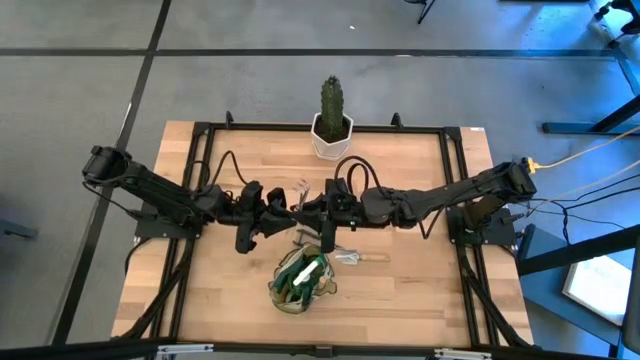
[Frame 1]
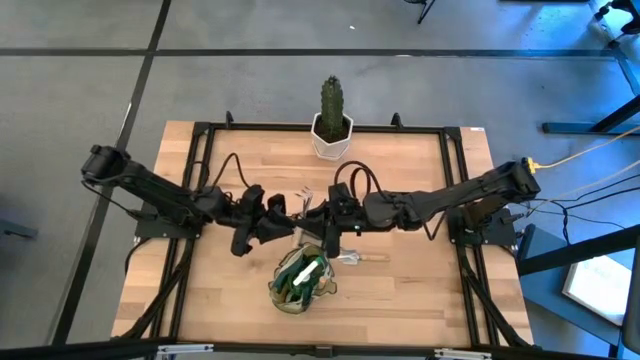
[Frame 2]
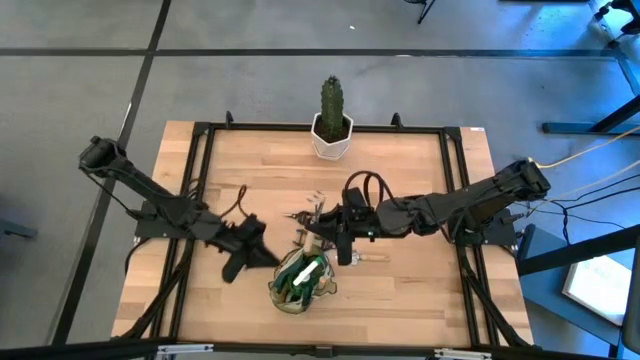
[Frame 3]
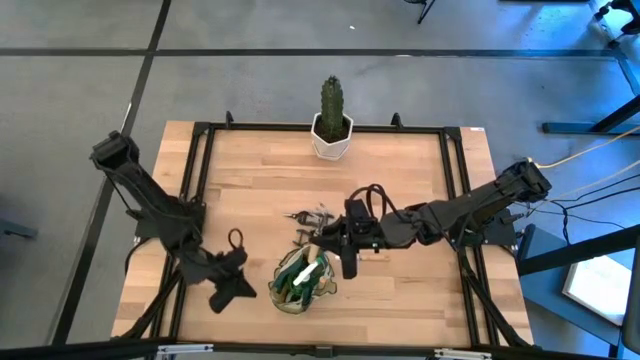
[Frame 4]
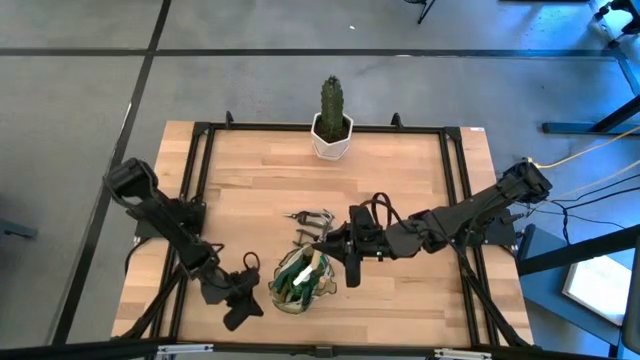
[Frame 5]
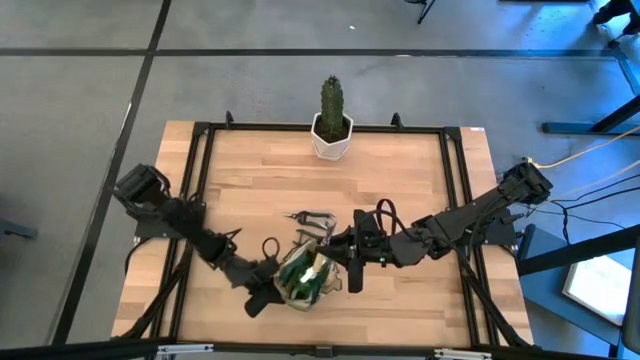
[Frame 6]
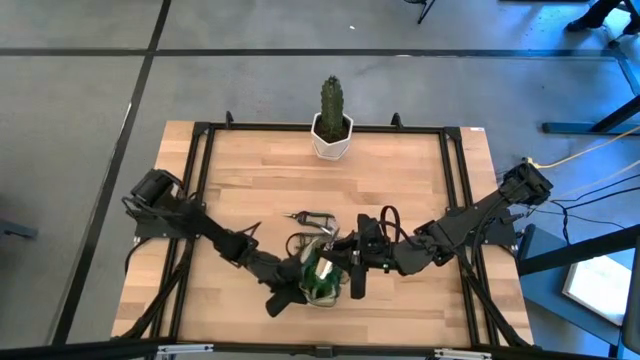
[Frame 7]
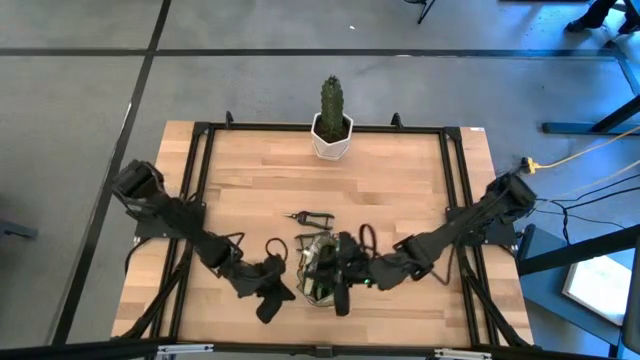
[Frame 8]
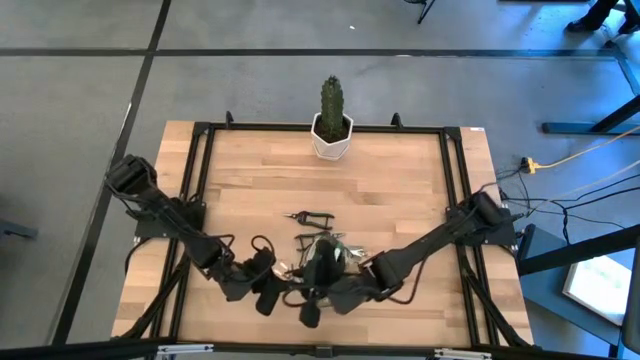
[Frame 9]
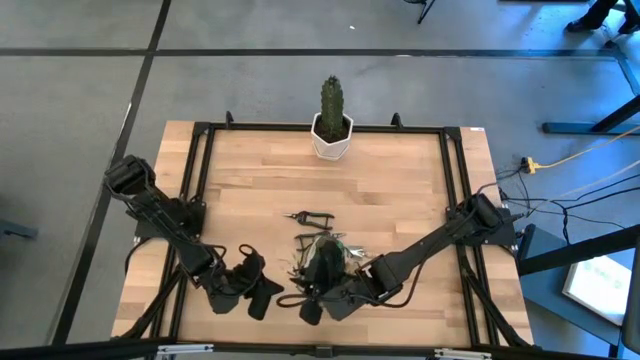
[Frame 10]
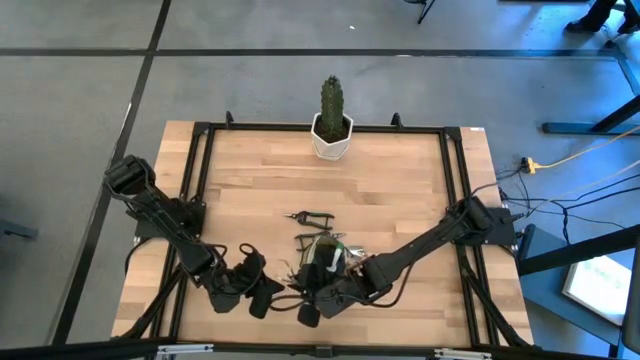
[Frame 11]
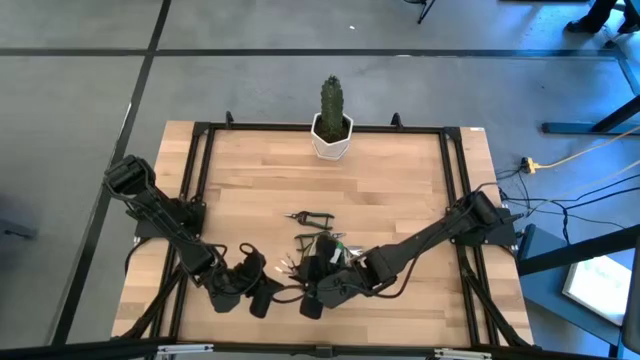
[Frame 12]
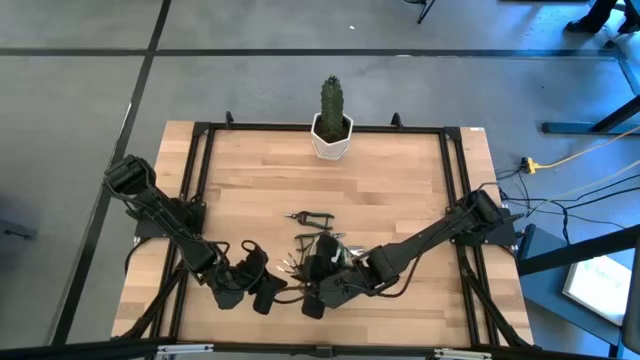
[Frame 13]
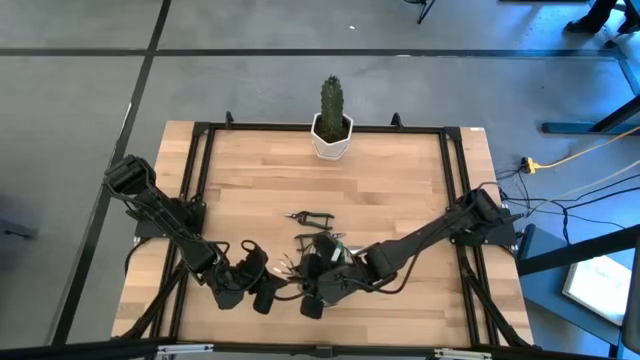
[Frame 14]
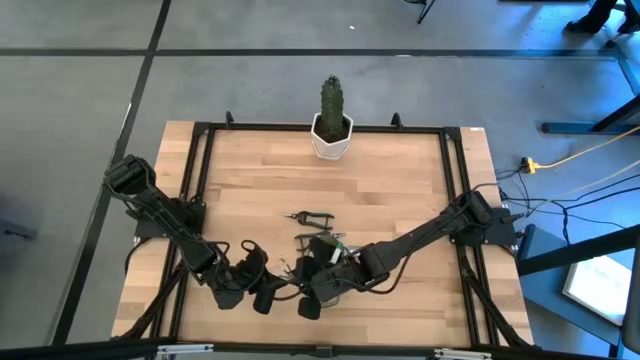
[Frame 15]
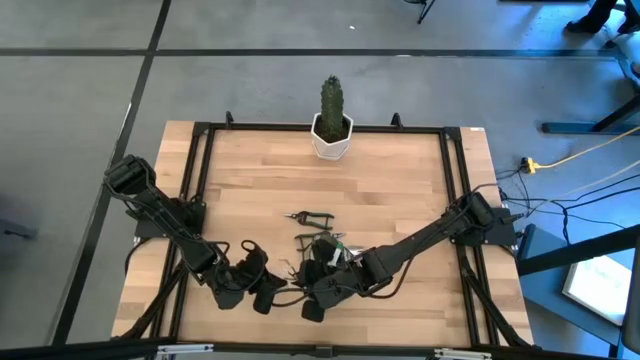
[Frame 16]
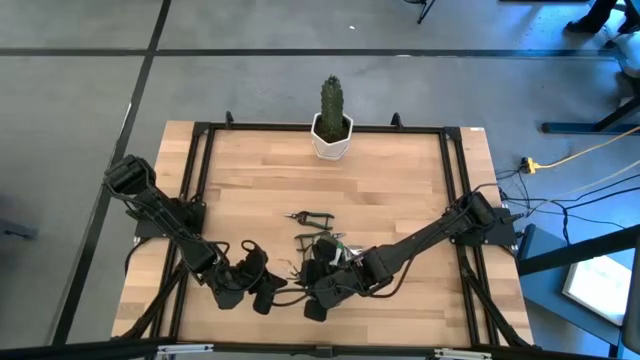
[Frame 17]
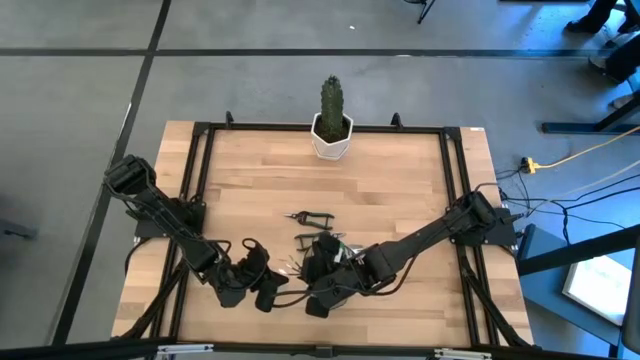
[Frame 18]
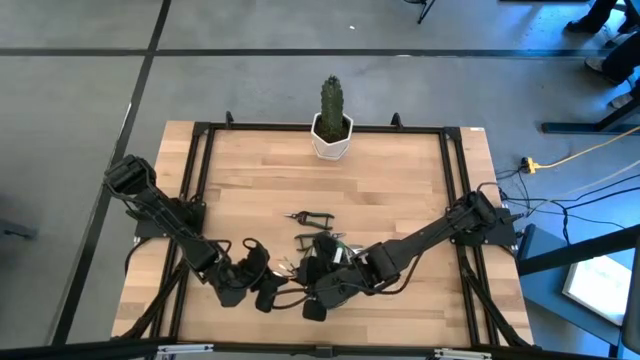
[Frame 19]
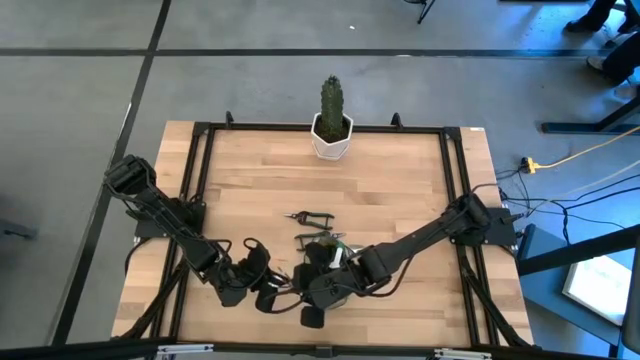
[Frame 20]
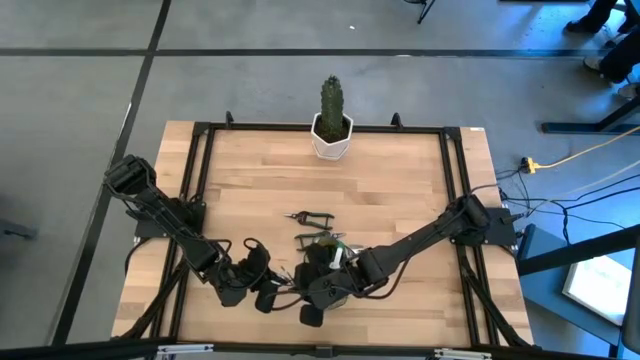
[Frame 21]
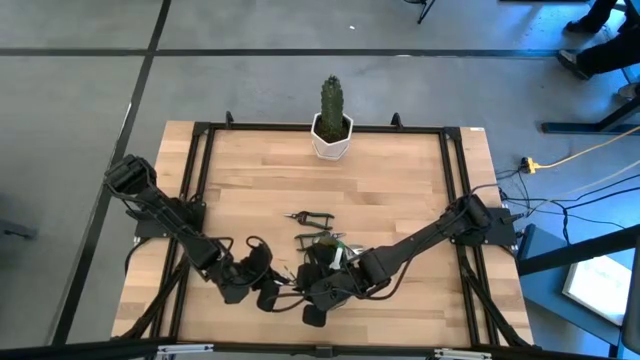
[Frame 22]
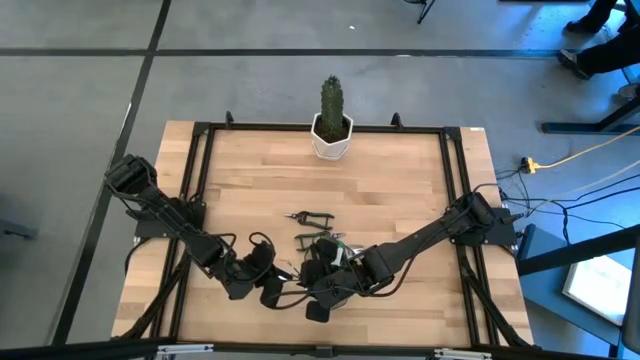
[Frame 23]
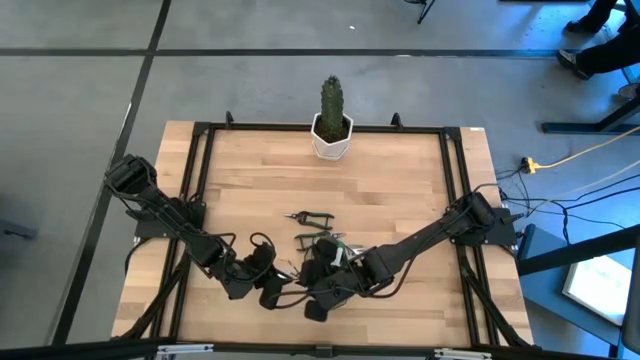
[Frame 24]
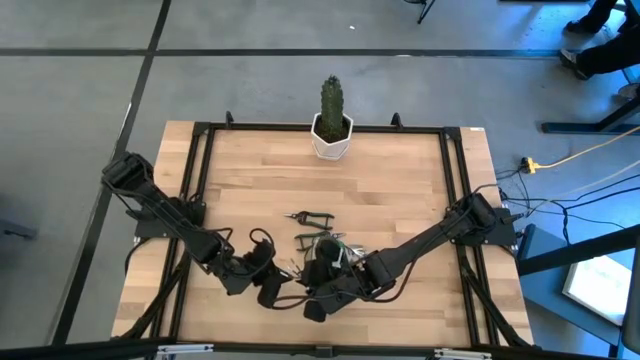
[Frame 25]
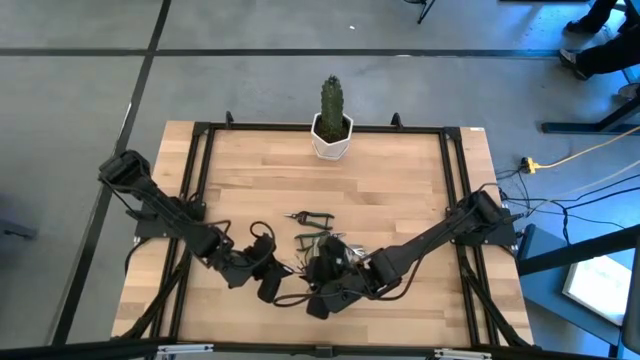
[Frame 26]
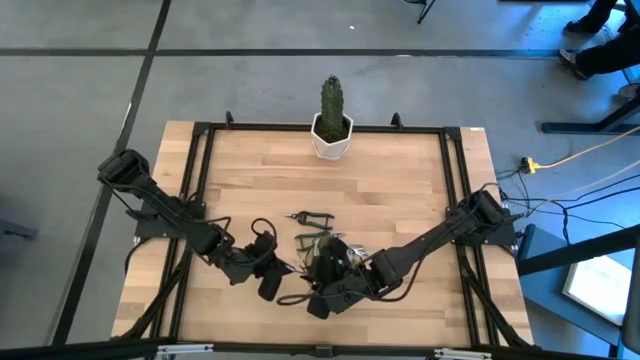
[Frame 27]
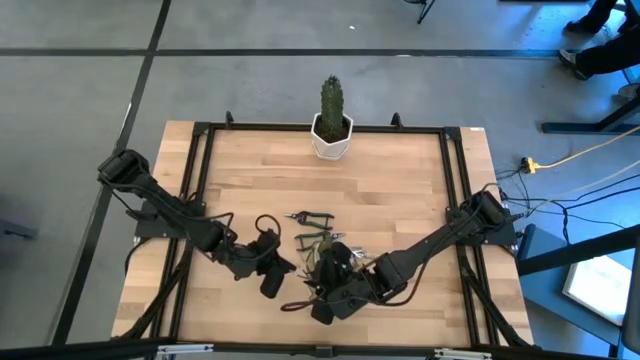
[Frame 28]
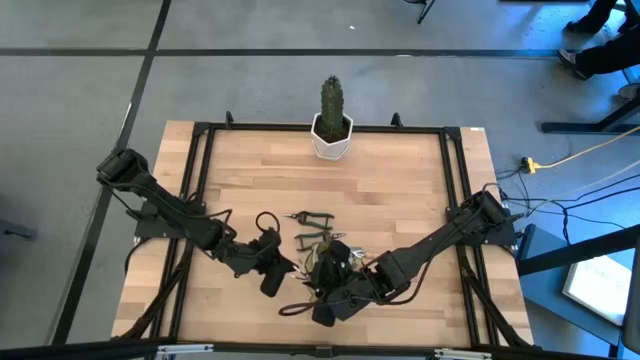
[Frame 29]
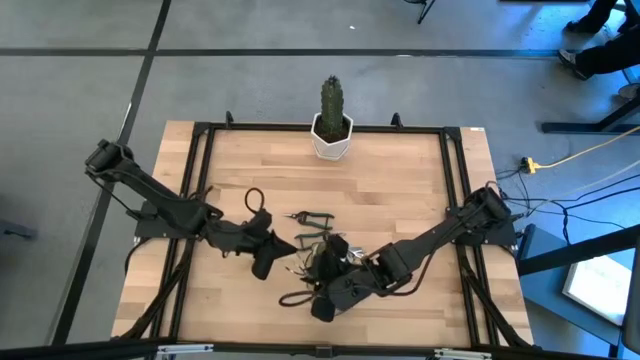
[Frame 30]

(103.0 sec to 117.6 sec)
Task: Pick & Place Garden tools in Gardening bag
Put the hand rake into the gardening bag

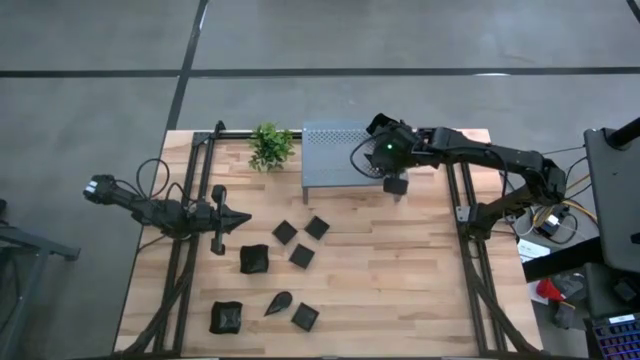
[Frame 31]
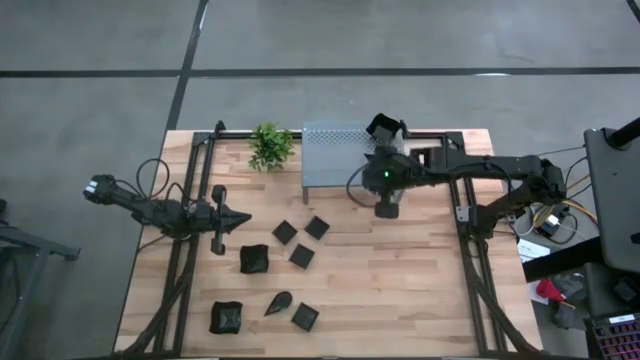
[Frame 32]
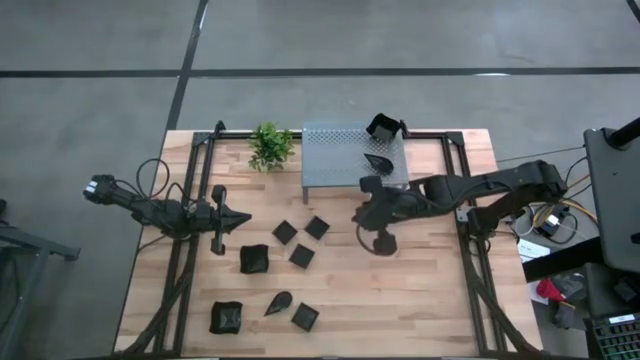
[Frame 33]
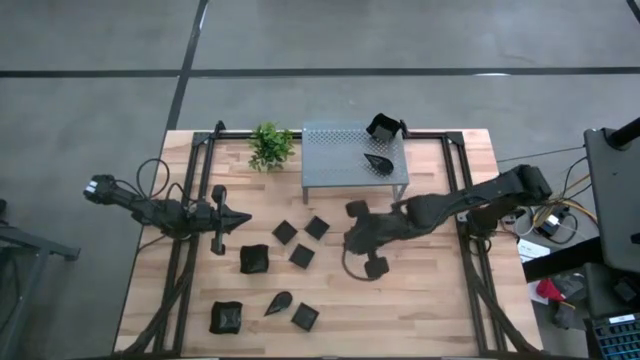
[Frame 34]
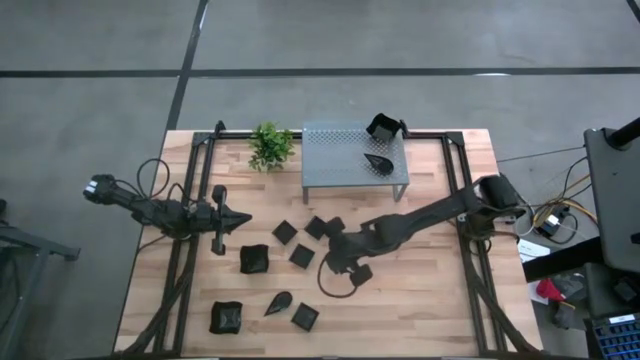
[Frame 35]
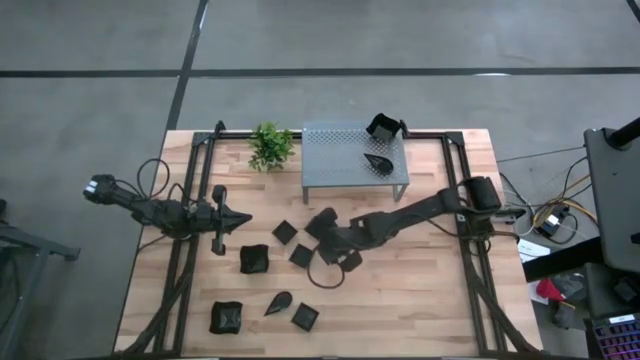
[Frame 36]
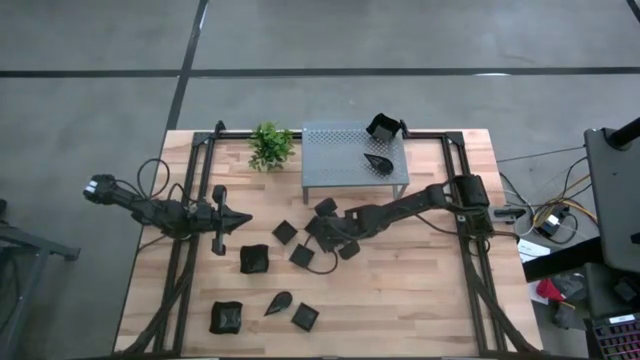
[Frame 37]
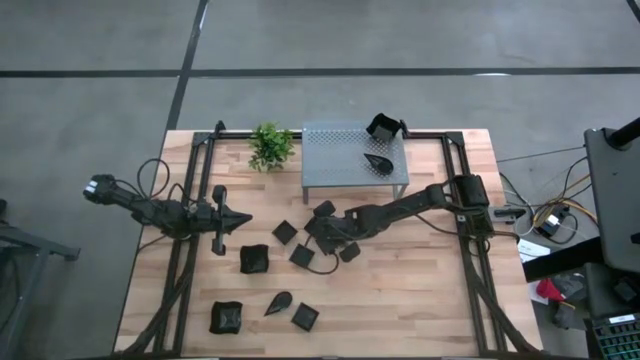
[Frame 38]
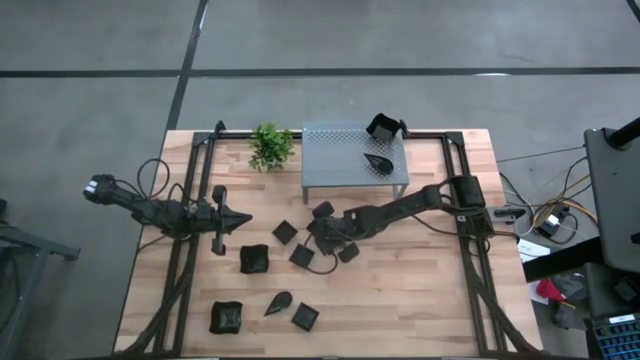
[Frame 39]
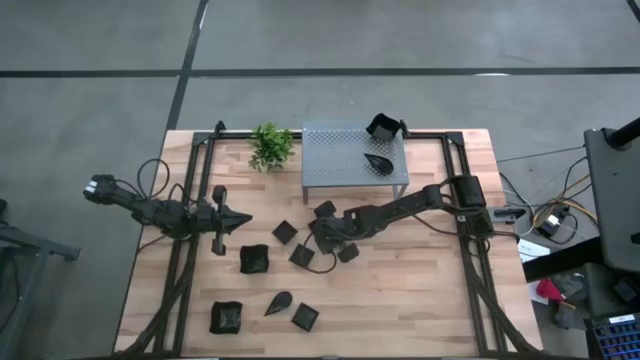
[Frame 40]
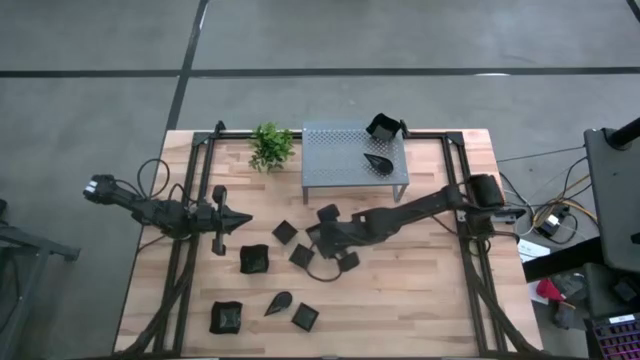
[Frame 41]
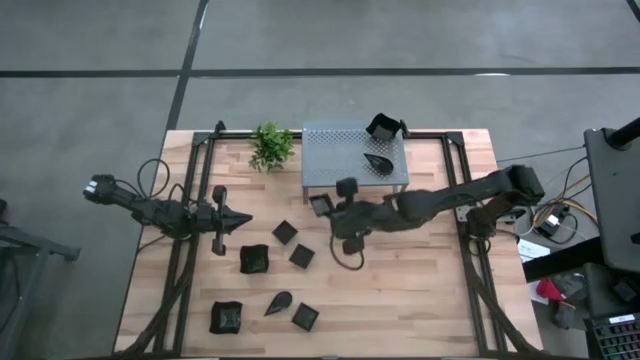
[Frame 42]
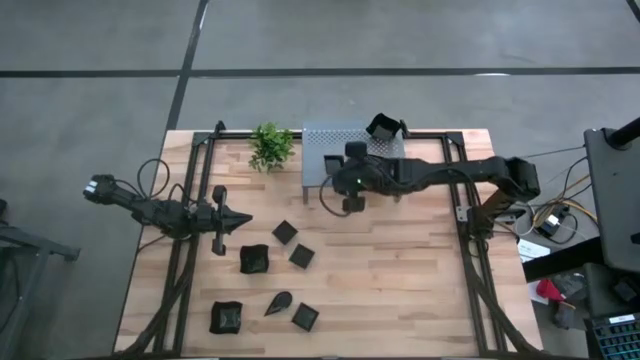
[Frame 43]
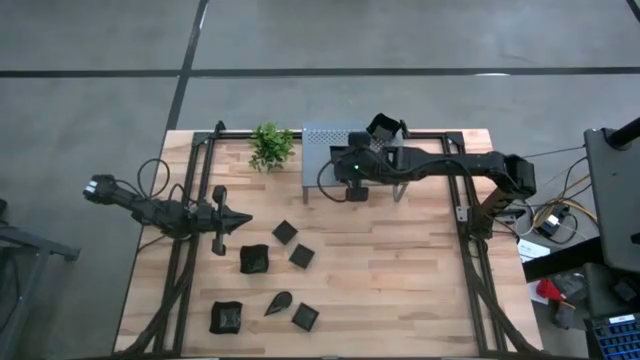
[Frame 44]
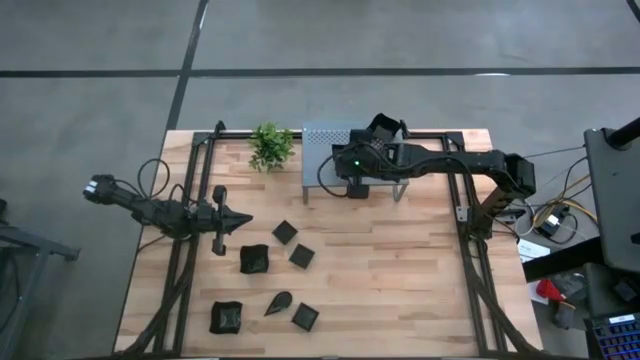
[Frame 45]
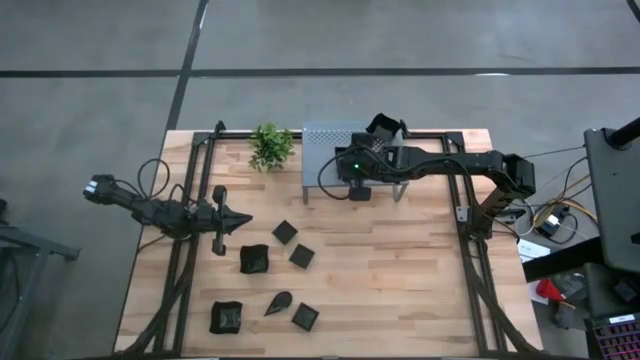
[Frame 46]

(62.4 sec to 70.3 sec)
Task: Pick & Place Mini shaped plates
Put the square plate on the shelf
